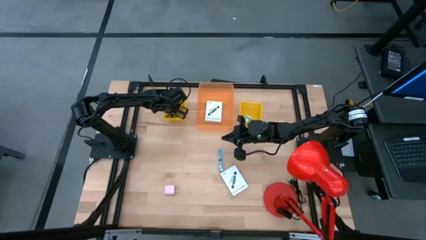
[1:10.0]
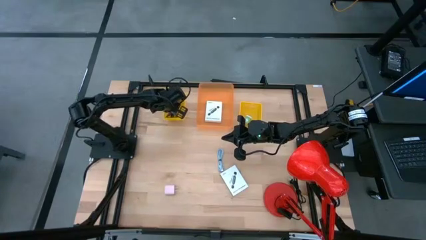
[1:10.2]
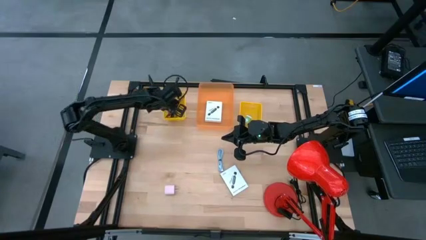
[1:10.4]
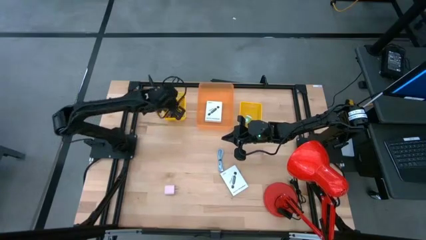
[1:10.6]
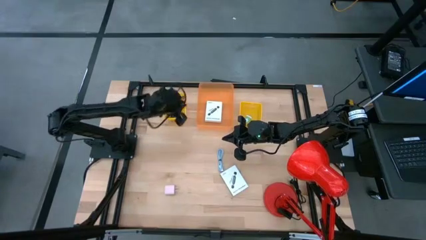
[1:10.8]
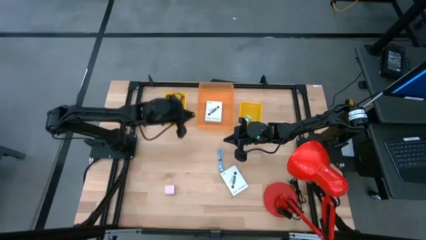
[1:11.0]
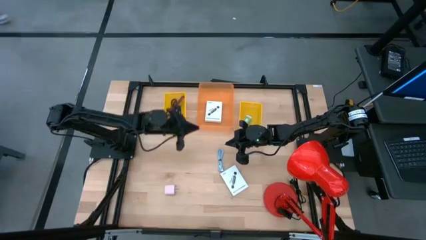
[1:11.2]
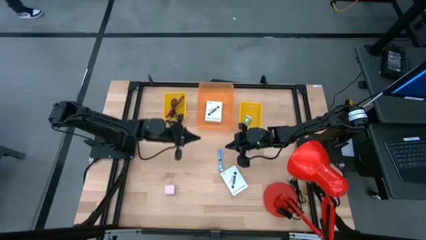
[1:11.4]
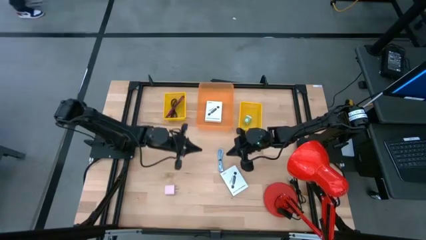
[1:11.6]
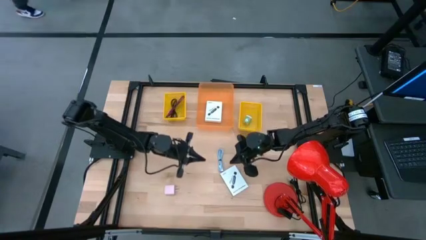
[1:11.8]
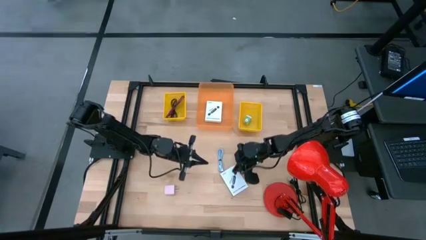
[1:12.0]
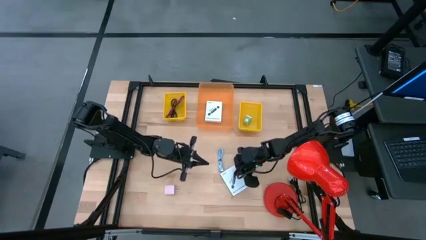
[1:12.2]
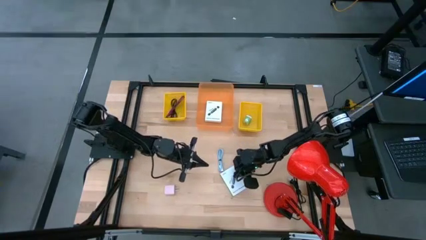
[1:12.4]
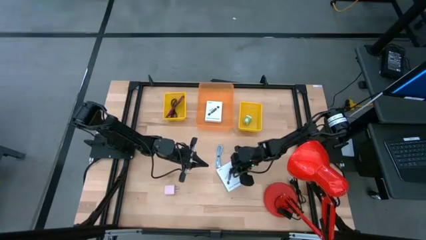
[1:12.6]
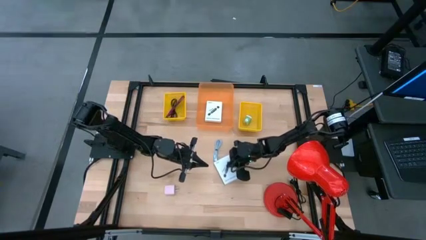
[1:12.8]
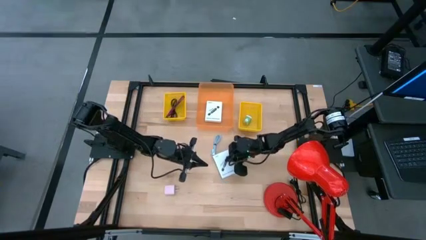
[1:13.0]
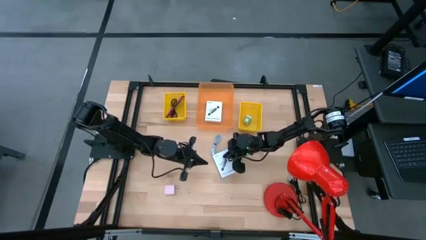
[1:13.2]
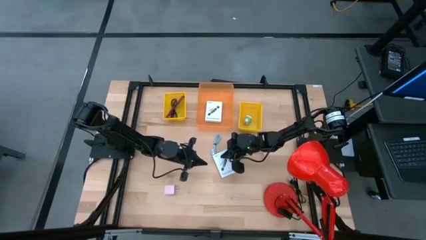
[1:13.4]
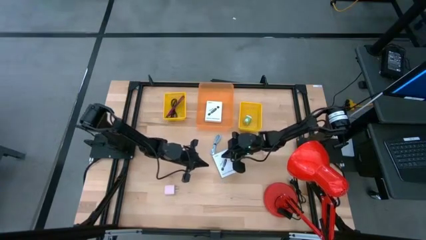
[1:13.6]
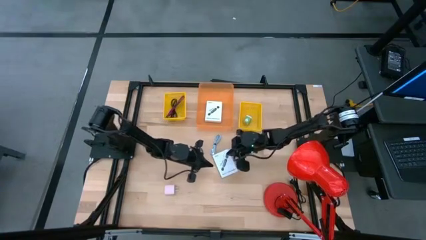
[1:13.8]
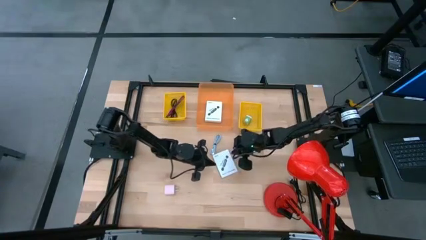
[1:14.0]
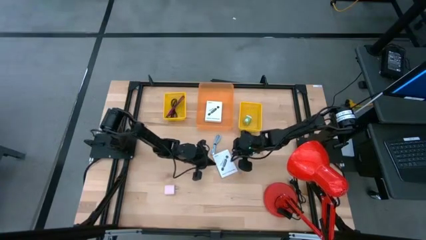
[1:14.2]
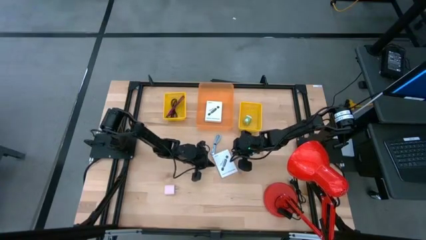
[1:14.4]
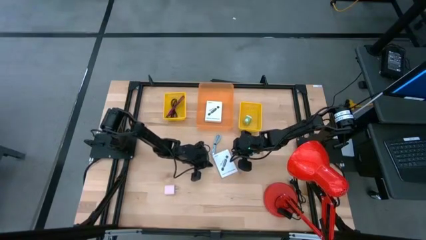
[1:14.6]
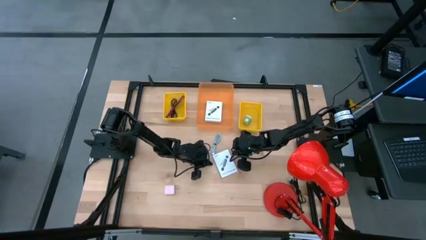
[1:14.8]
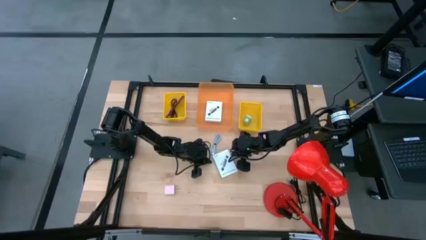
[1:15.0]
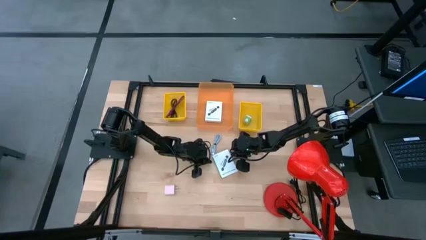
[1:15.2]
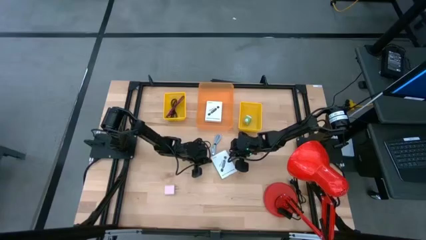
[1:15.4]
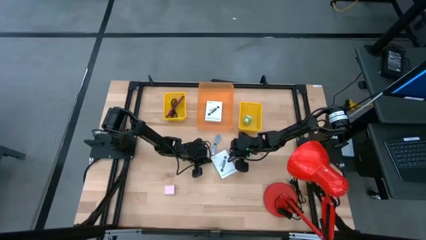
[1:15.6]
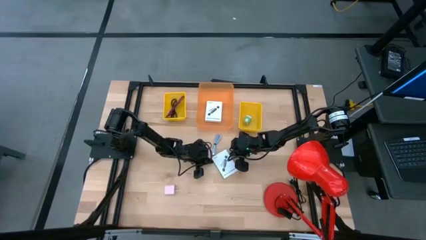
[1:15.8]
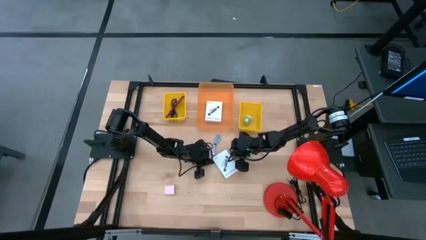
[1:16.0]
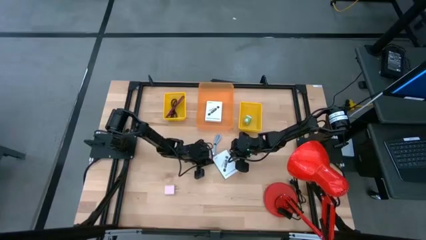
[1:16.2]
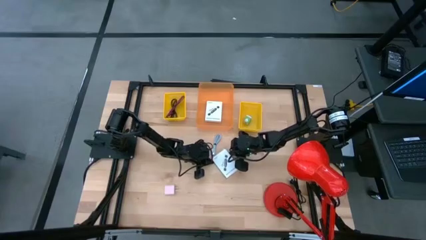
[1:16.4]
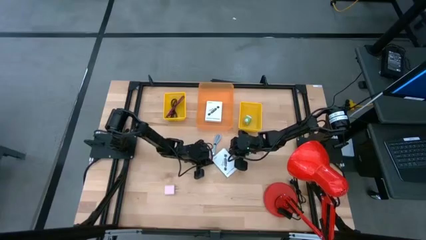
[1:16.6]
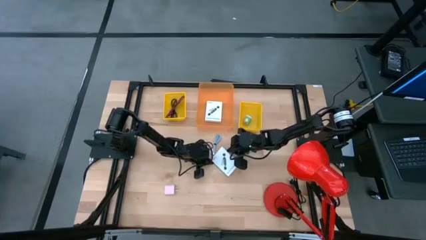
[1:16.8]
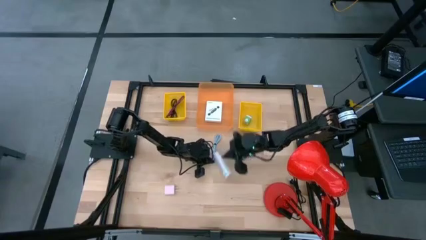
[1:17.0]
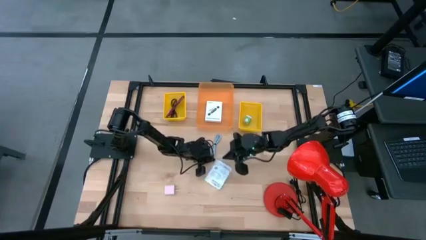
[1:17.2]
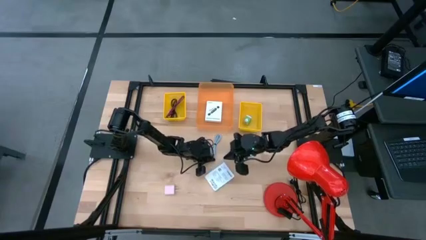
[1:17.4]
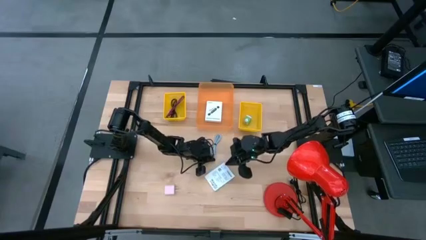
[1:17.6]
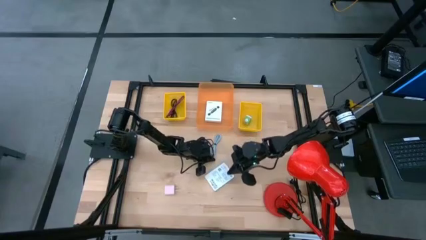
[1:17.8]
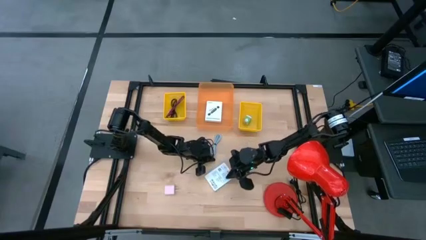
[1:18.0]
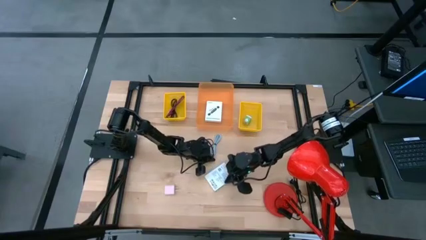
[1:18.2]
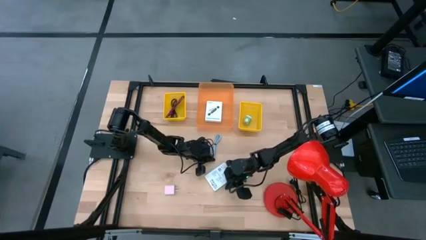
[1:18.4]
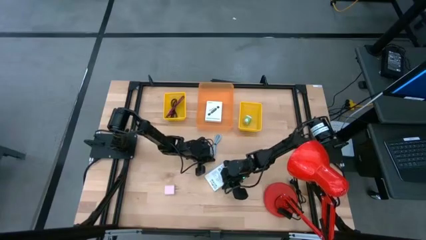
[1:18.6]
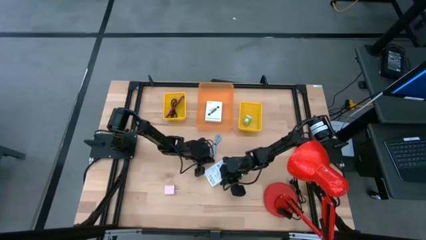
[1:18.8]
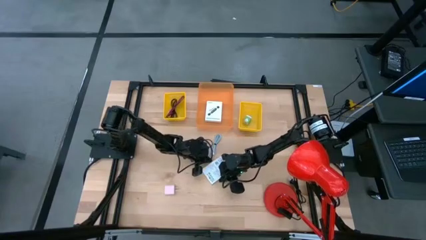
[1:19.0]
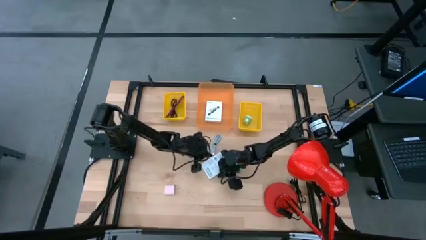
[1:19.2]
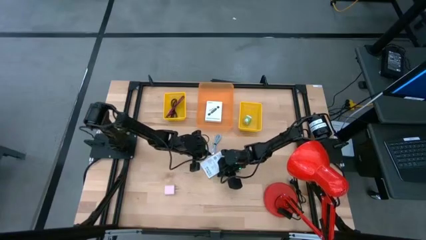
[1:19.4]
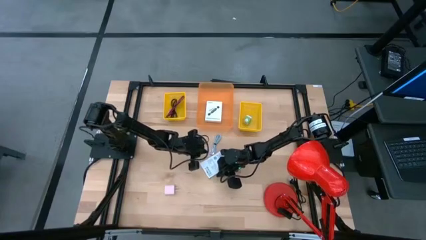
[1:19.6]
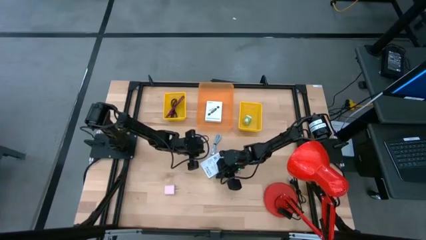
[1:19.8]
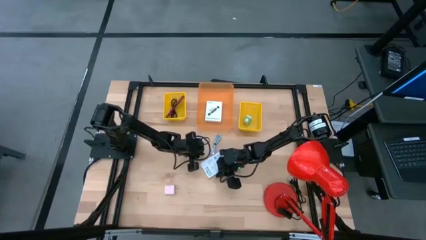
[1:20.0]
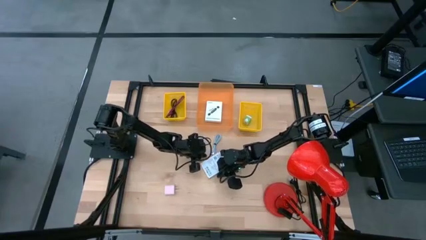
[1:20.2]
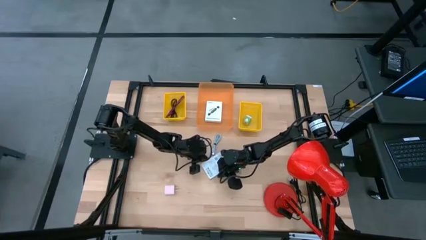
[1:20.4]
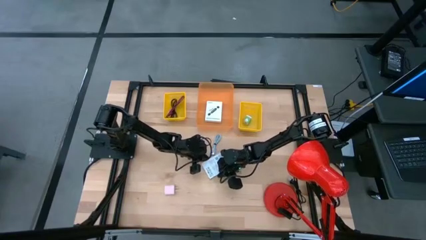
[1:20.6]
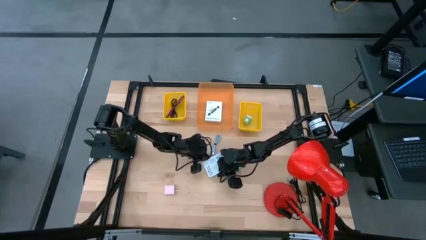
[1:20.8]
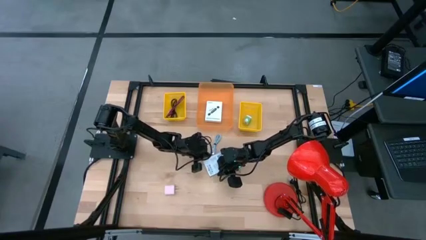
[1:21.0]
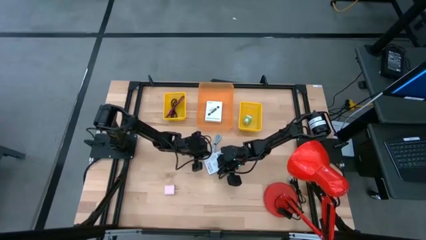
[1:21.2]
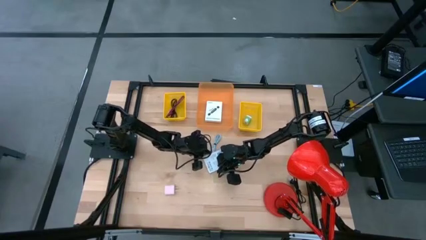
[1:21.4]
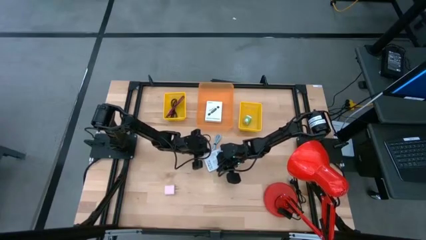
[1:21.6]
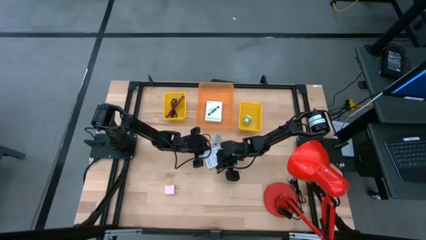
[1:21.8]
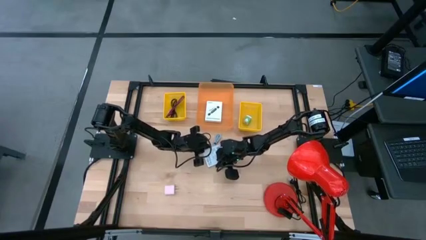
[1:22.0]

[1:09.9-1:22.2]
Task: Pick and place items into bin
Put the card reader box into the orange bin

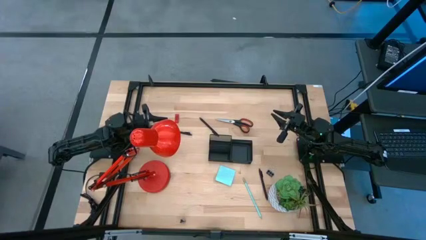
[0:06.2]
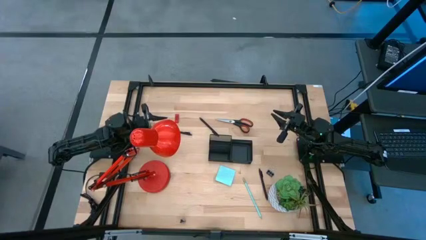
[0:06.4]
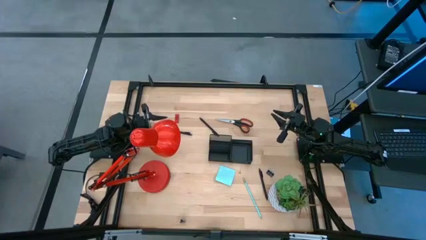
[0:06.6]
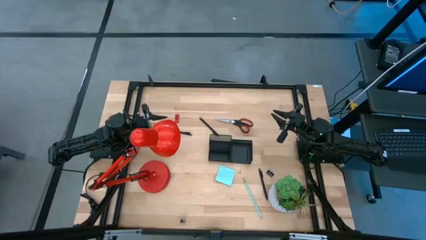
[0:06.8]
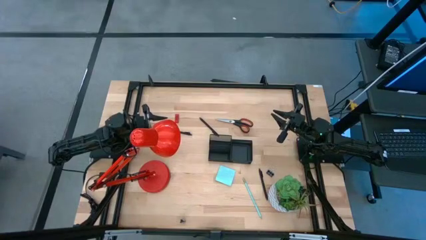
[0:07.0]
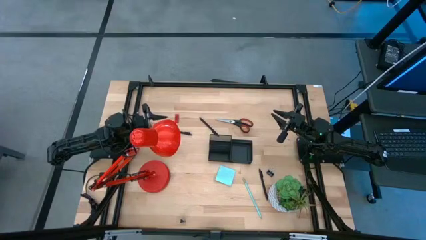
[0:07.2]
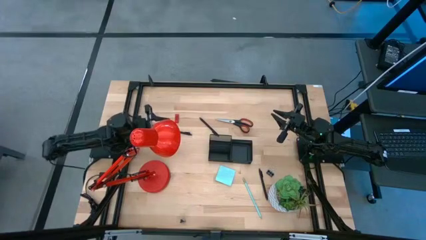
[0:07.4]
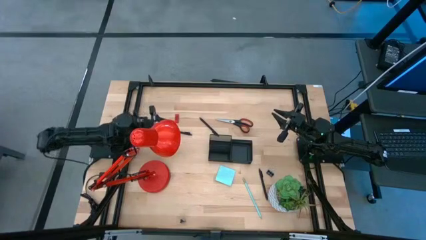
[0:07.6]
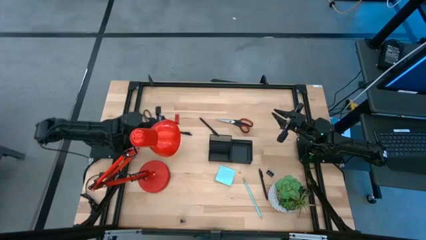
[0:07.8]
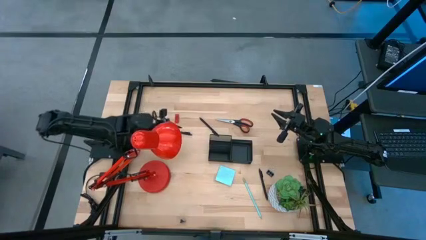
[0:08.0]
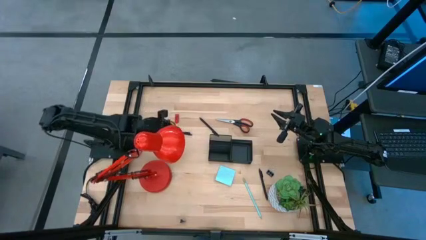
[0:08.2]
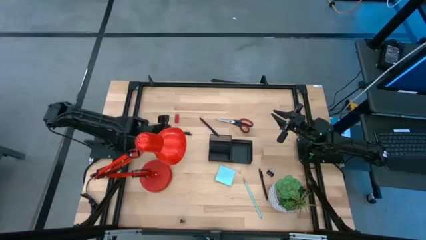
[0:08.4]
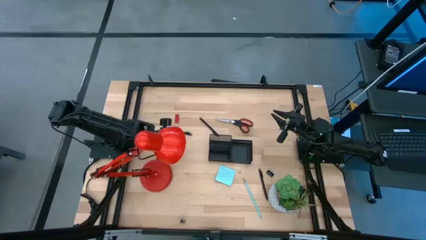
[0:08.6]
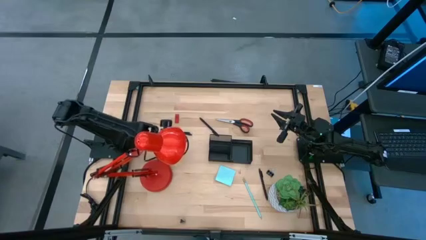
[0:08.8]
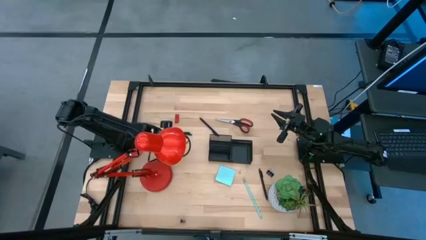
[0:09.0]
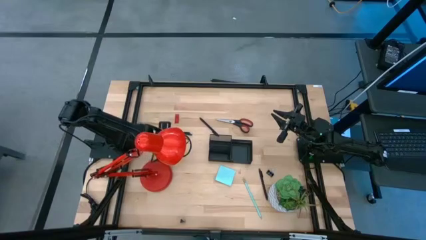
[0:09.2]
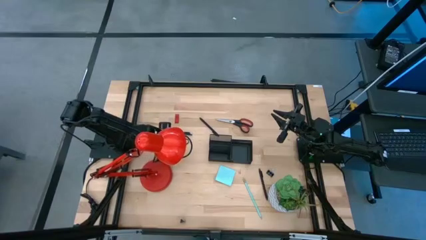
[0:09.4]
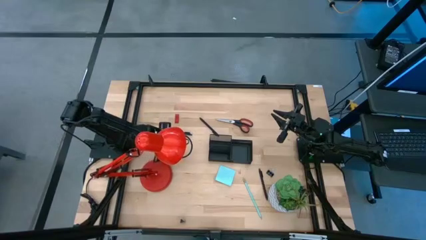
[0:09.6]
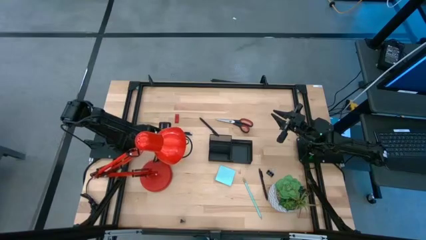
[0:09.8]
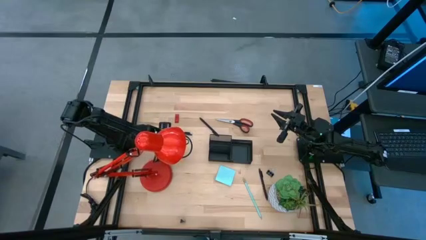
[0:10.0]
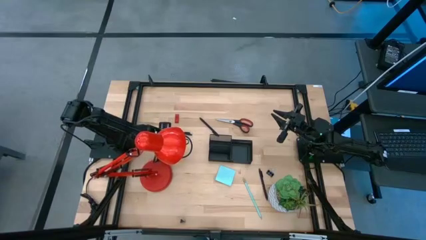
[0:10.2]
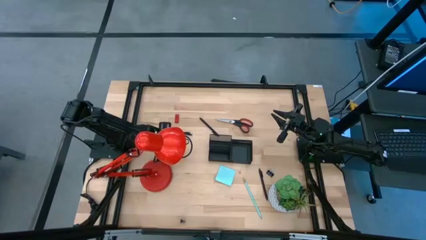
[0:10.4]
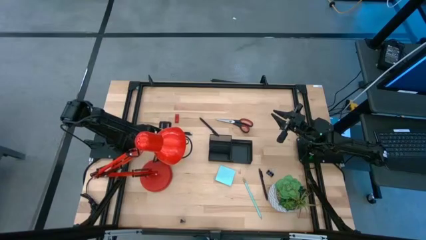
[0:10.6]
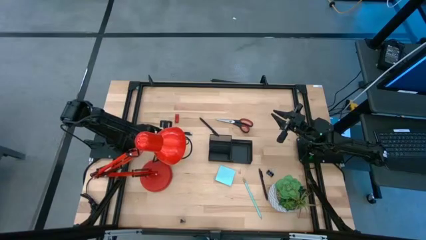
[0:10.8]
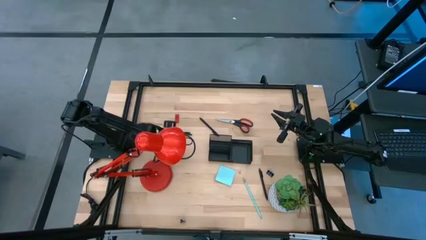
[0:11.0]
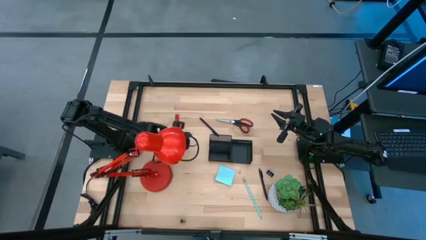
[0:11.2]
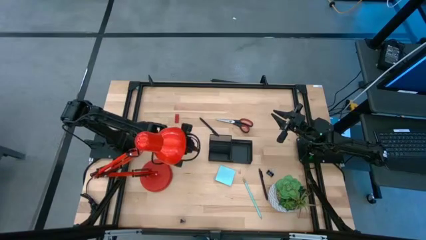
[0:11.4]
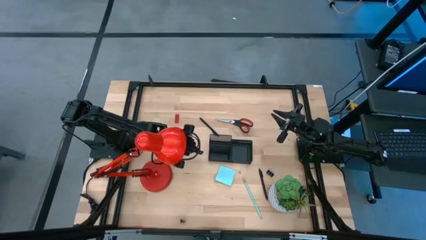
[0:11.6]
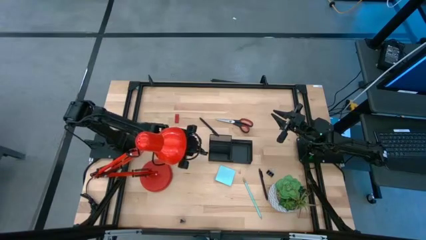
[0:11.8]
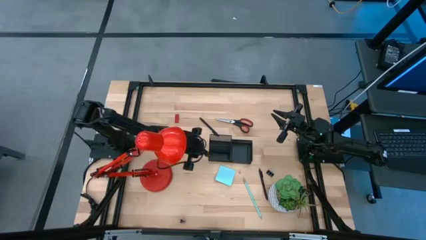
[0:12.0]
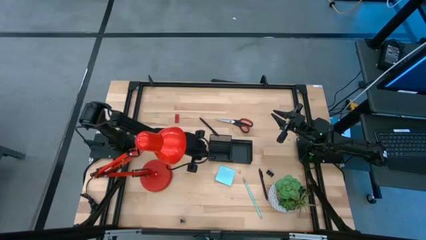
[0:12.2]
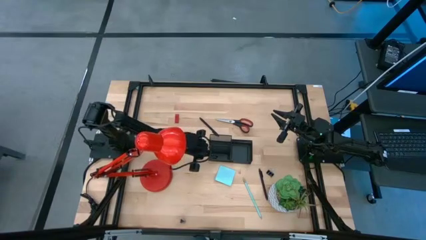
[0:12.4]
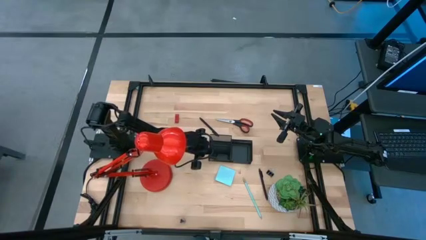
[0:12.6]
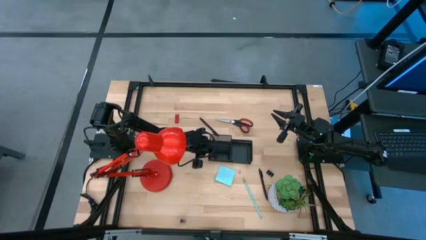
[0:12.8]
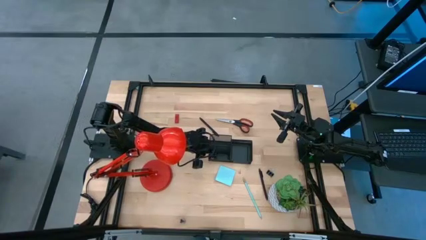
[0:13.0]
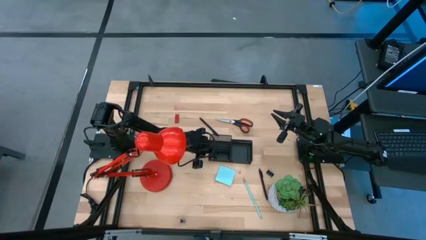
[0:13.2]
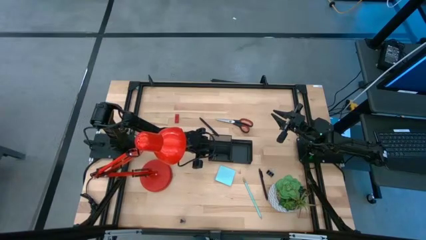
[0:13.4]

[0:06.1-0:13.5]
Task: Pick and place office supplies into organizer
Put the top left black binder clip into the black desk organizer
